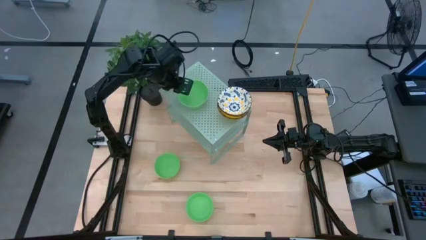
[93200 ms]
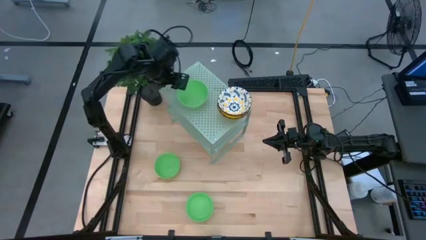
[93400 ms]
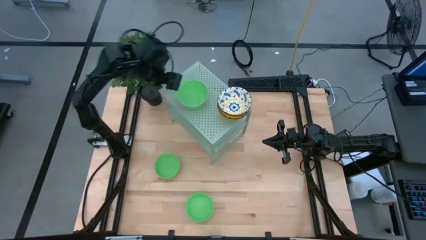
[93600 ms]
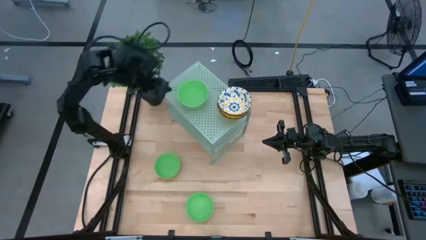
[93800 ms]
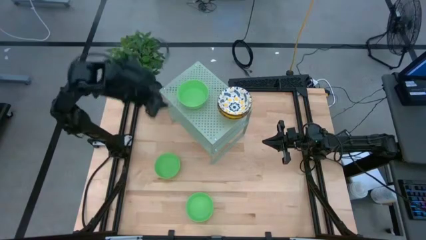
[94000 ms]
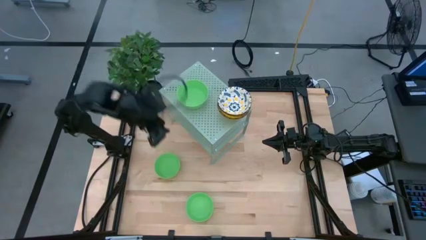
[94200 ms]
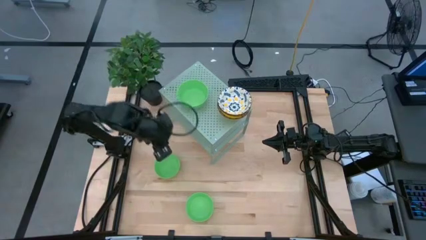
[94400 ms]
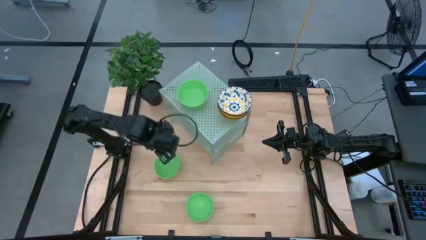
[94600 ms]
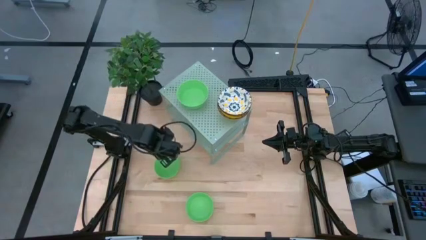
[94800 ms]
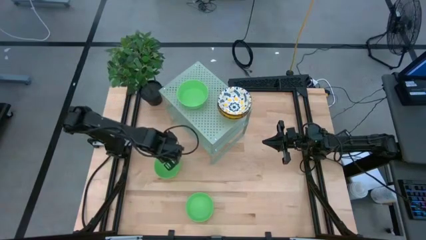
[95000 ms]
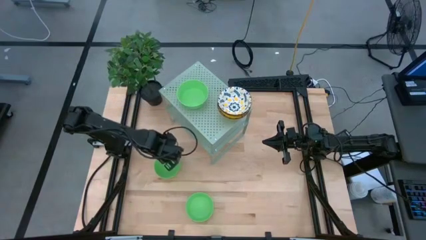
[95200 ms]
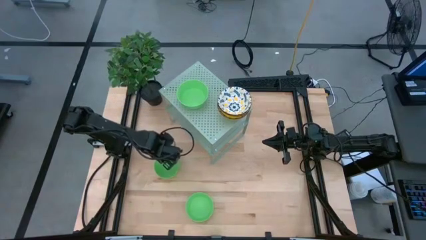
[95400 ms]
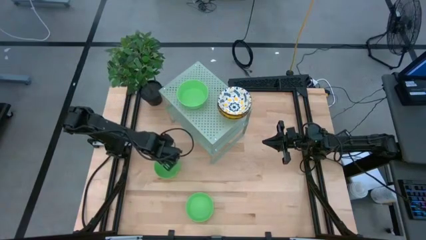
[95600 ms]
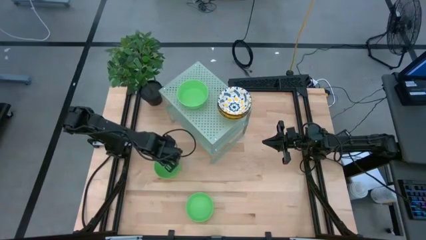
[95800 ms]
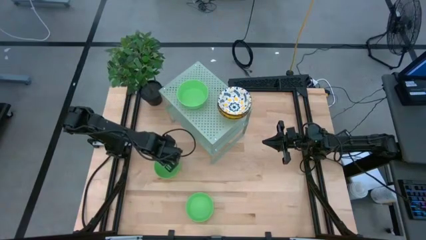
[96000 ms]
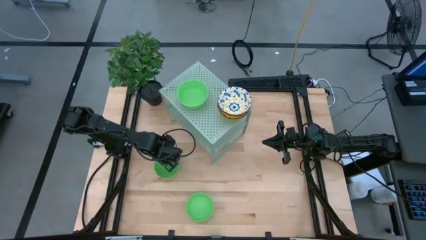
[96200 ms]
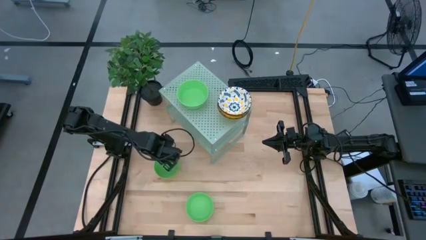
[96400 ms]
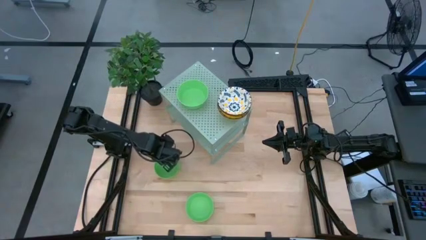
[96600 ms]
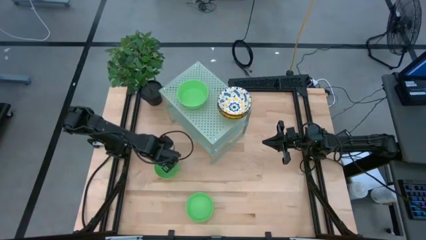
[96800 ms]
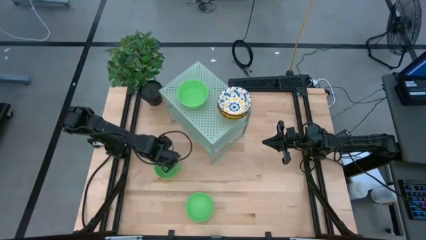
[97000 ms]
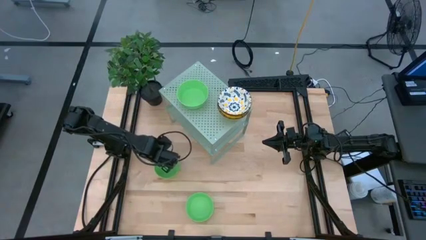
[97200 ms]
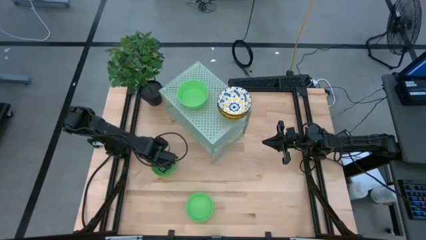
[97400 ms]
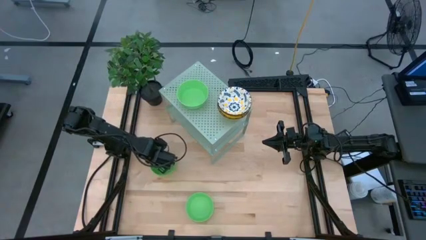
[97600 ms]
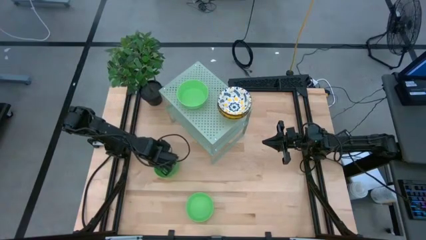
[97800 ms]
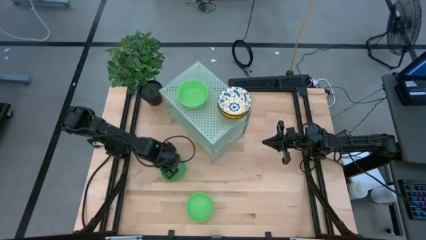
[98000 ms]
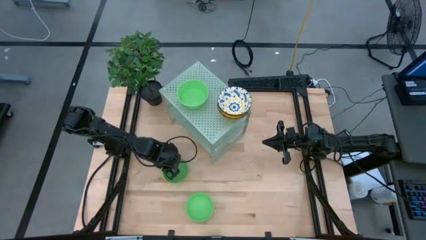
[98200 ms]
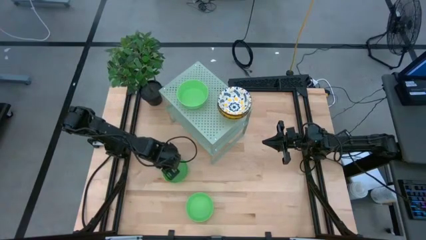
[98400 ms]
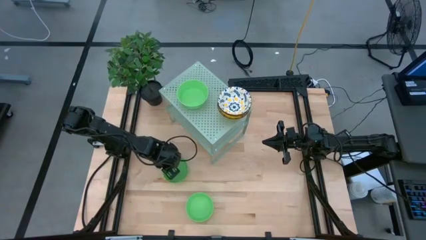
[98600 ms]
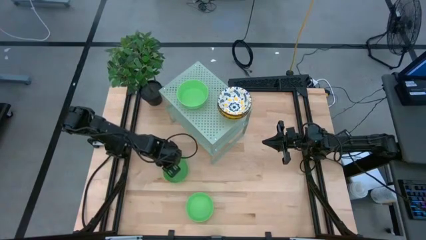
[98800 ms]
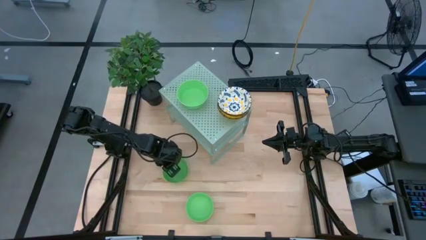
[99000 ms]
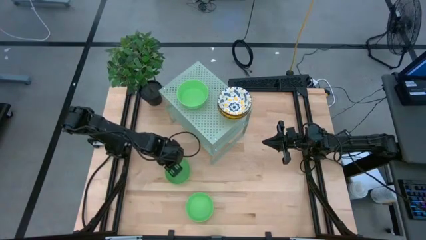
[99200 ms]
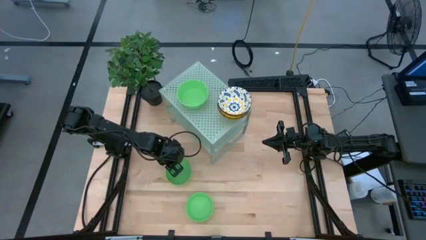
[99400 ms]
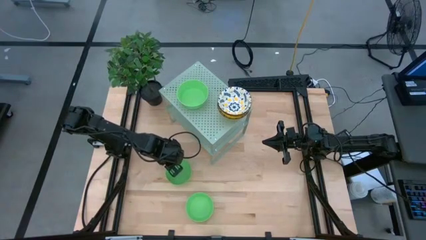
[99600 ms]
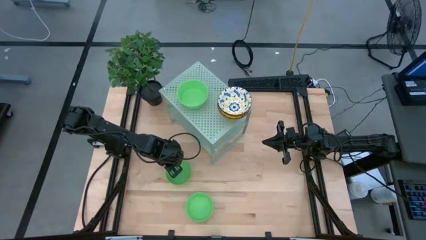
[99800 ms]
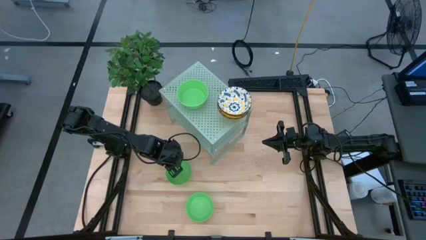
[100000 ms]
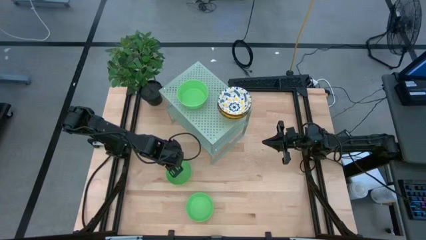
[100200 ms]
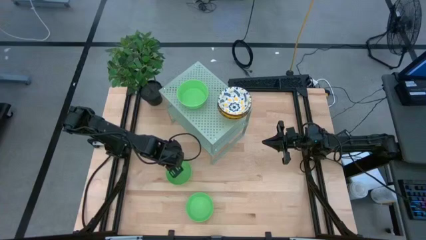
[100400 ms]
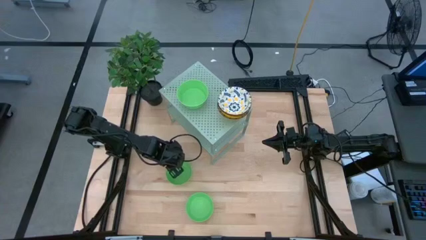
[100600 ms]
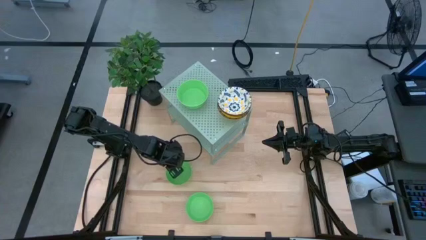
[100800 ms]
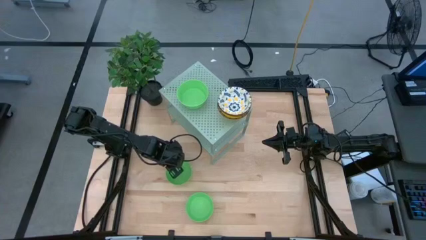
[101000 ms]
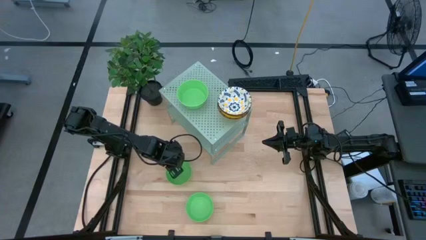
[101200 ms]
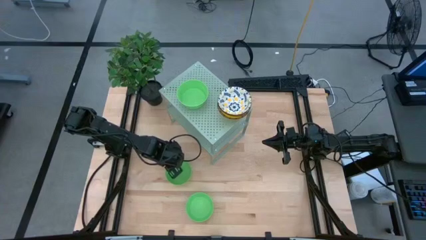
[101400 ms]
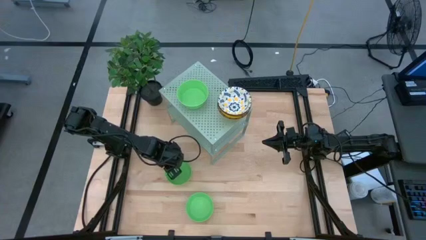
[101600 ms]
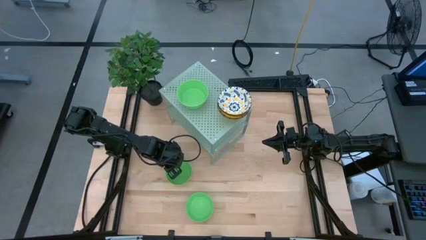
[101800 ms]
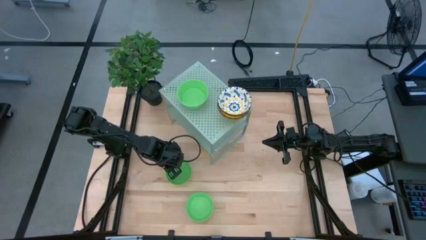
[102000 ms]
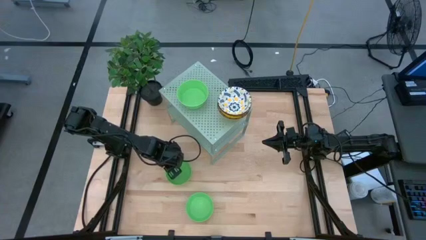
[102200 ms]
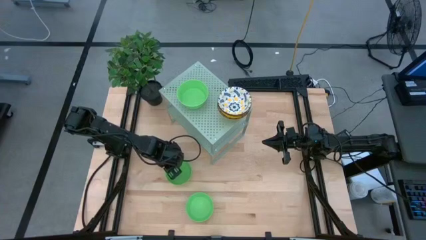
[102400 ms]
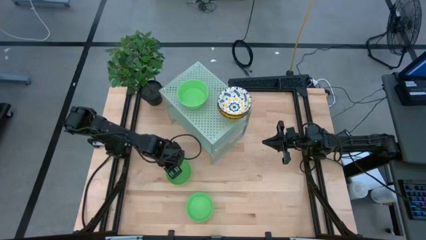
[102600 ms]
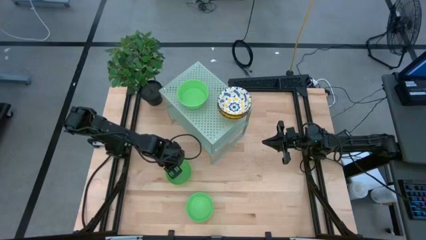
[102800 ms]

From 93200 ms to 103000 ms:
Task: Pick & Place Mini bowls
Stack the top green bowl on the green bowl on the shelf

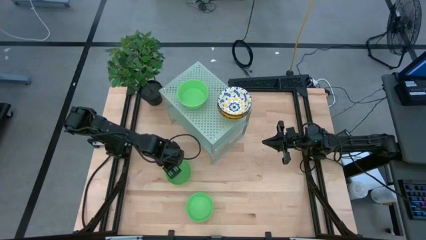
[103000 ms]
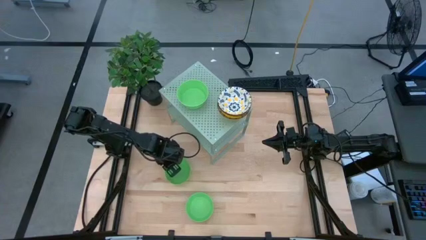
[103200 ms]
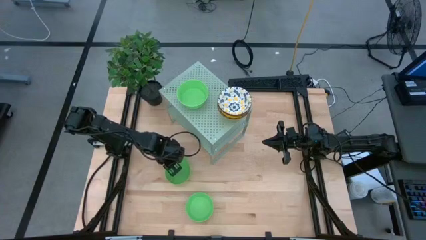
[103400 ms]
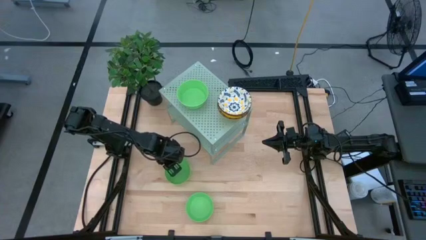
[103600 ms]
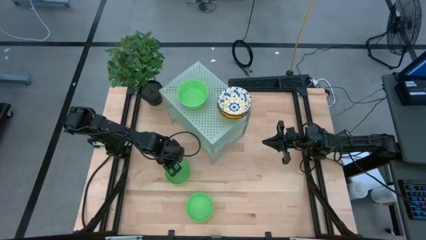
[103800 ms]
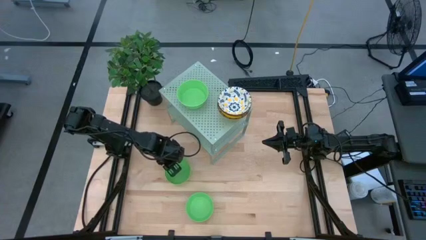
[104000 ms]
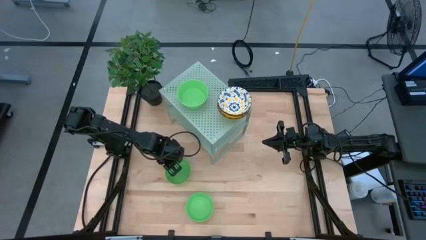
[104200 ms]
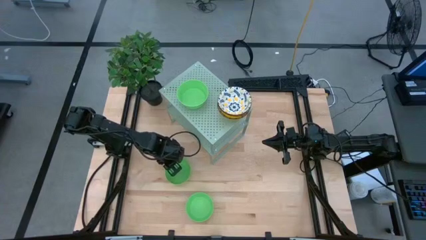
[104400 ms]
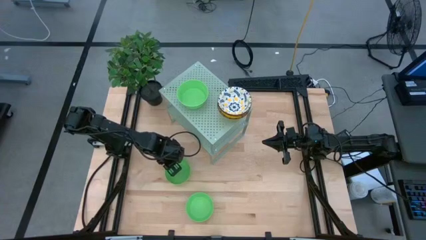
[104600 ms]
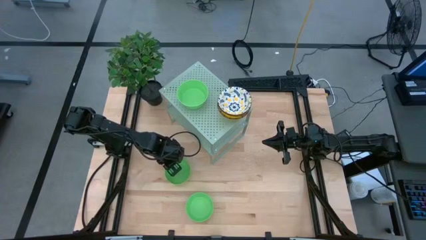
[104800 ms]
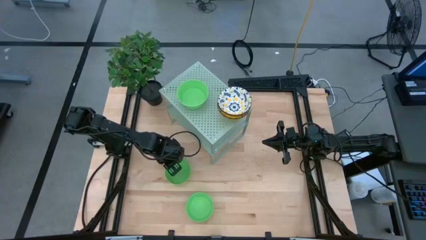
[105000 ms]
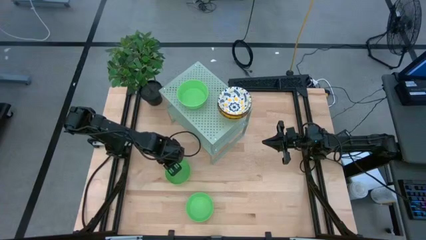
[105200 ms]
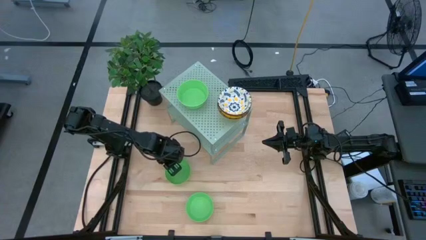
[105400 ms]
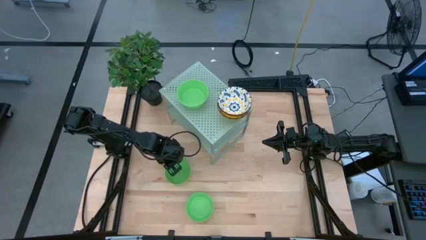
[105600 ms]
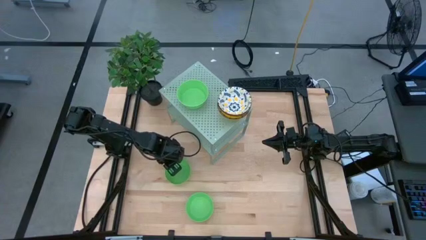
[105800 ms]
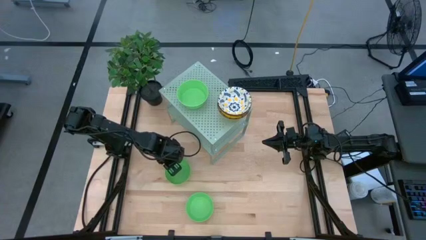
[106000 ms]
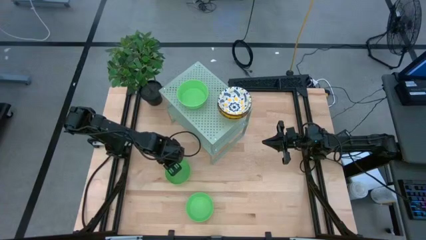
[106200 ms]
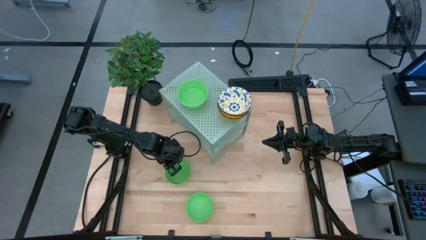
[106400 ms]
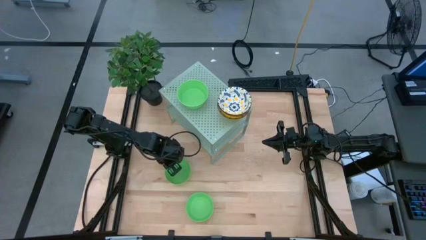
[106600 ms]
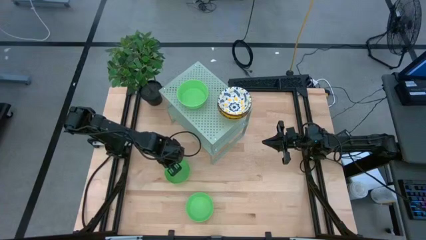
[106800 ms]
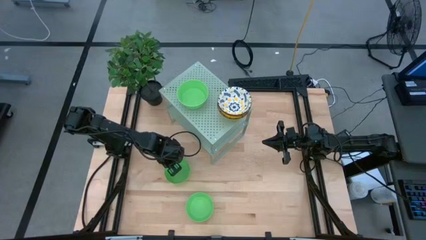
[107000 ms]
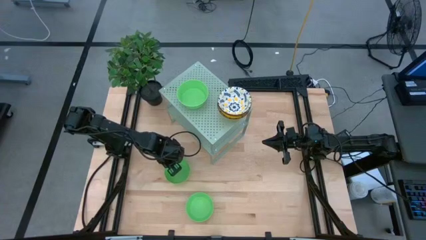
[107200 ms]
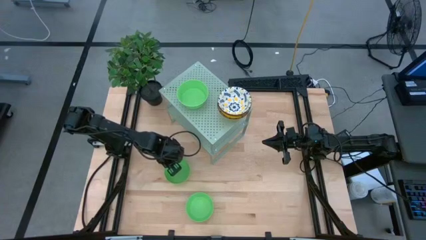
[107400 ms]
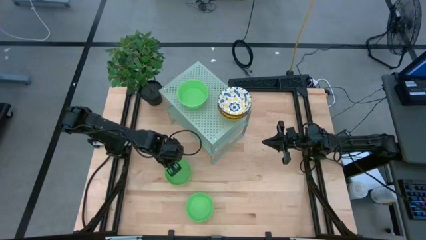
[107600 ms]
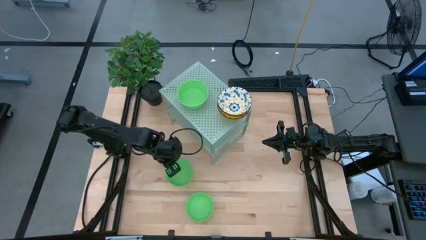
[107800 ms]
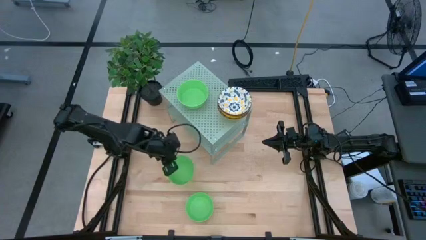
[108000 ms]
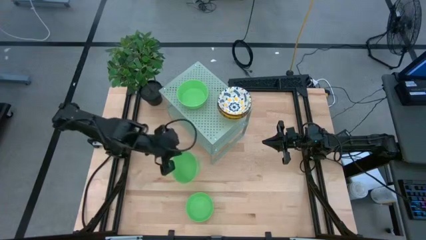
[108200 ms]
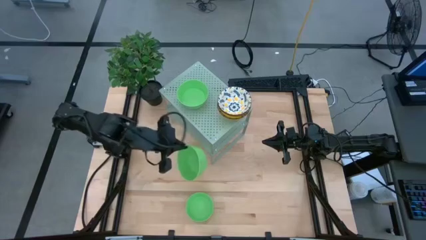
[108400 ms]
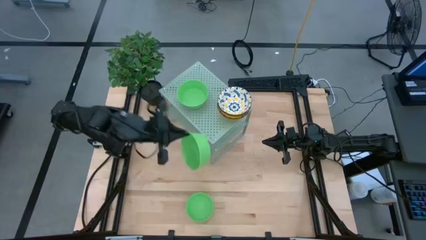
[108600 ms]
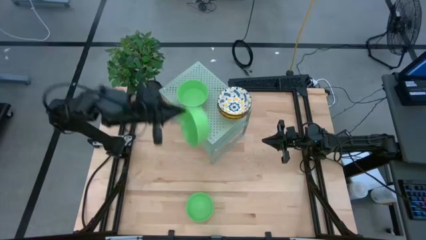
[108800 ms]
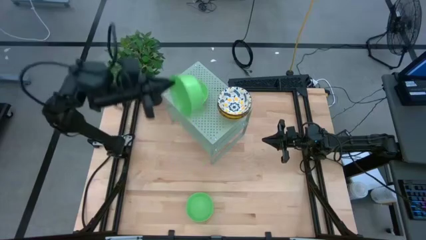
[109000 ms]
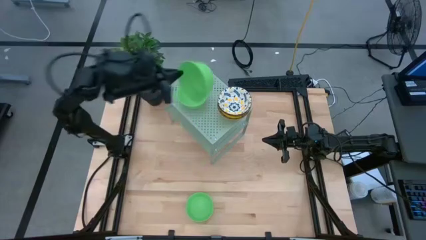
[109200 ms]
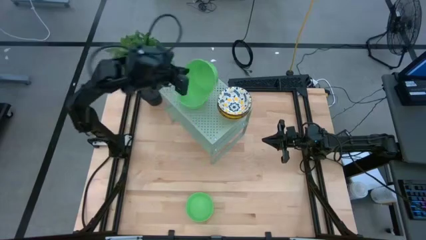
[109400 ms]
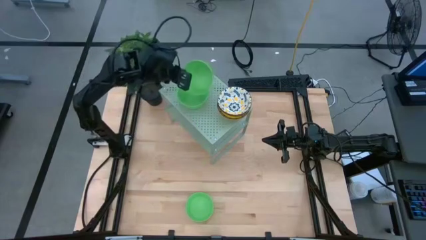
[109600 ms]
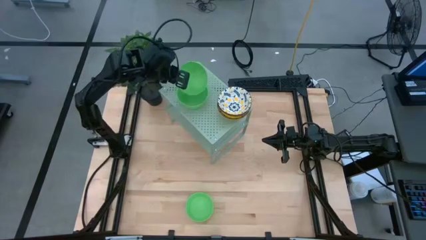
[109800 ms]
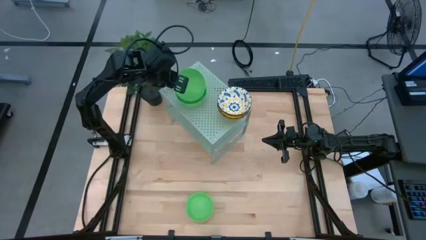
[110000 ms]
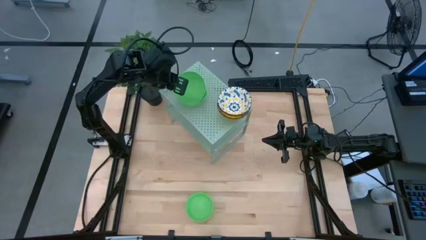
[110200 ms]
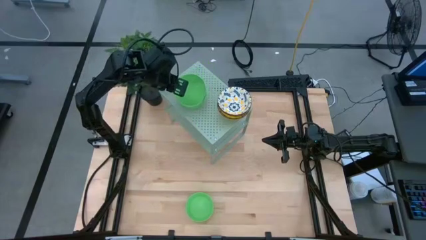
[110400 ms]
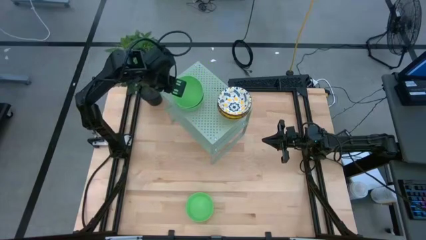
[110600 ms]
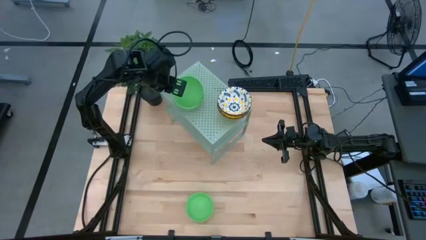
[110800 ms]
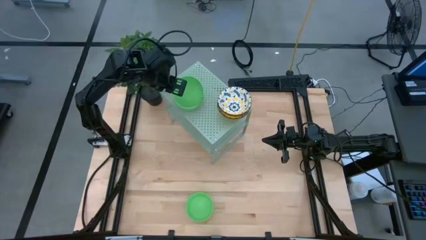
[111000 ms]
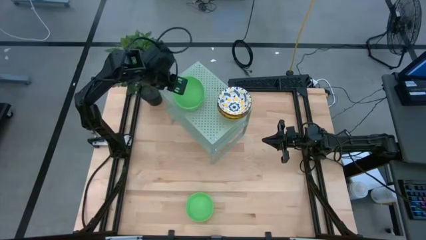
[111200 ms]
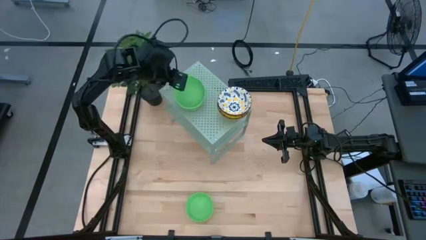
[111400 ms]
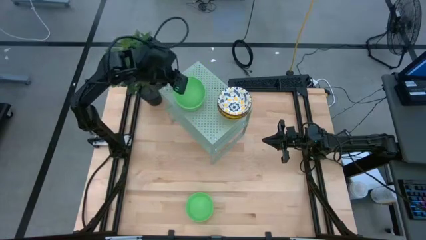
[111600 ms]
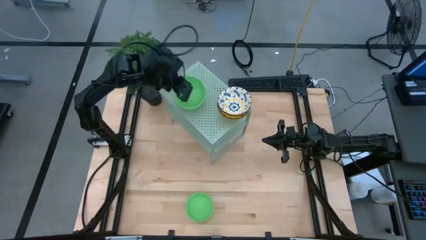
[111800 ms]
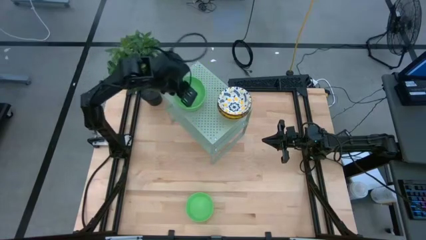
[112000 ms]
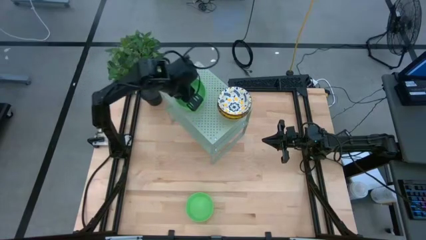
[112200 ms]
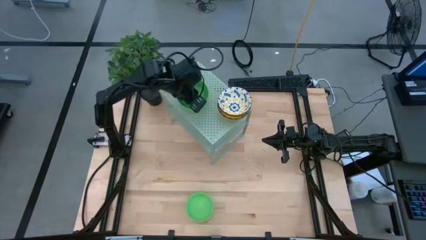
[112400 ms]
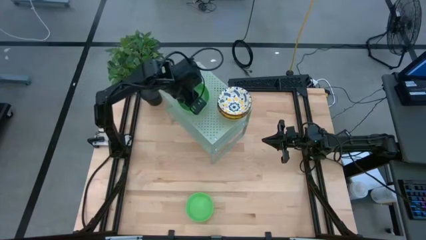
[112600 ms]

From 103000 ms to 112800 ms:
Stack the top green bowl on the green bowl on the shelf
